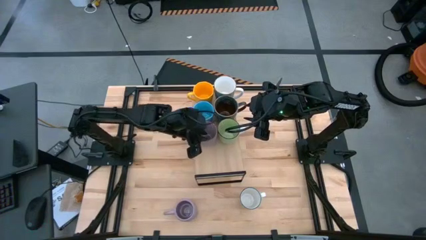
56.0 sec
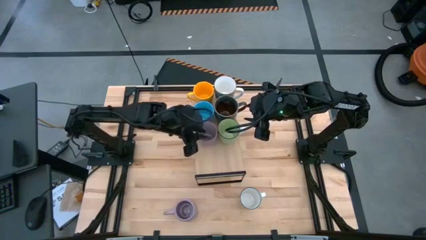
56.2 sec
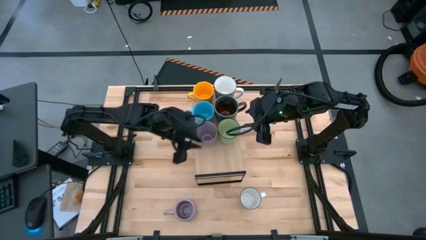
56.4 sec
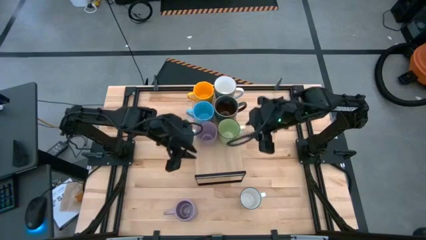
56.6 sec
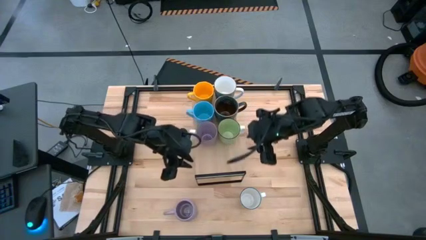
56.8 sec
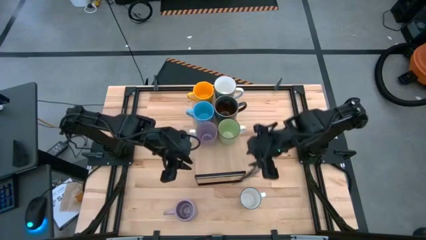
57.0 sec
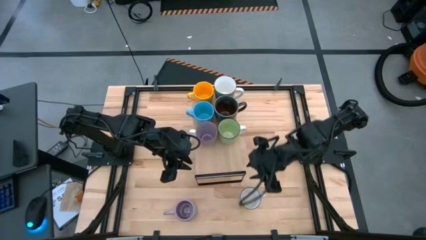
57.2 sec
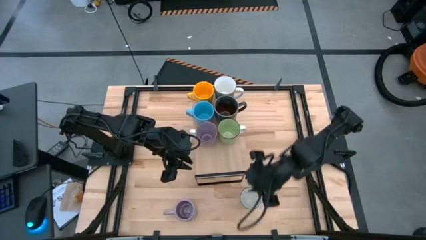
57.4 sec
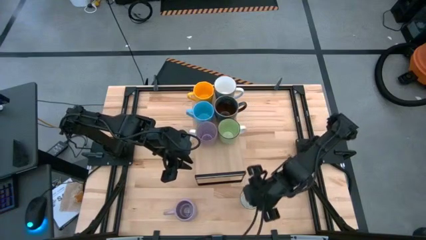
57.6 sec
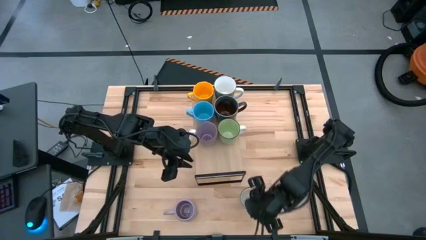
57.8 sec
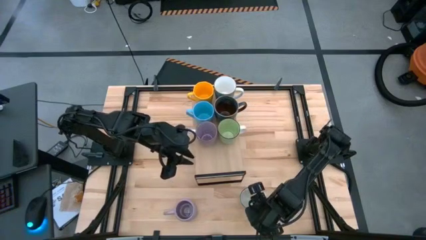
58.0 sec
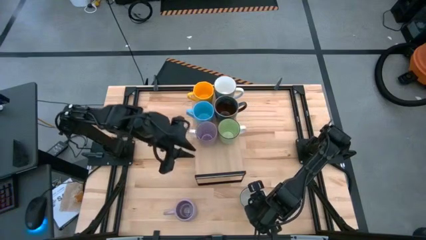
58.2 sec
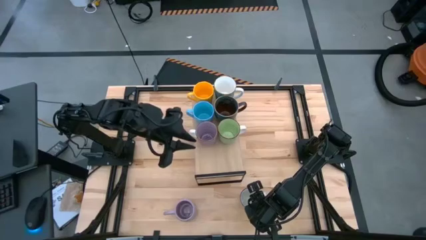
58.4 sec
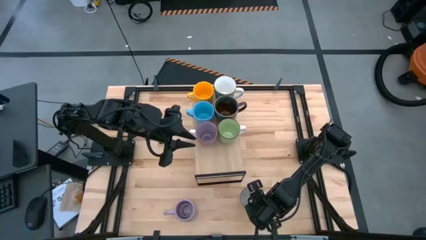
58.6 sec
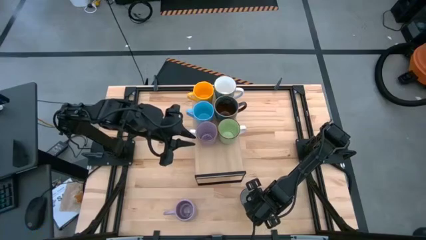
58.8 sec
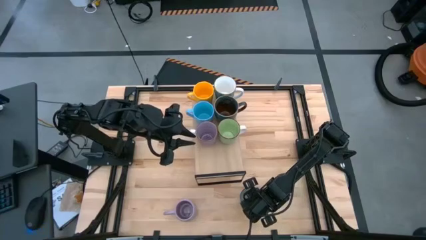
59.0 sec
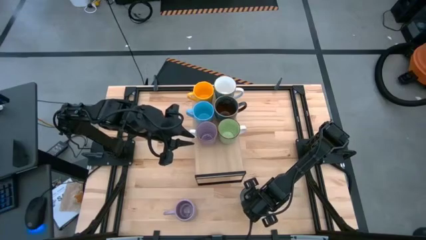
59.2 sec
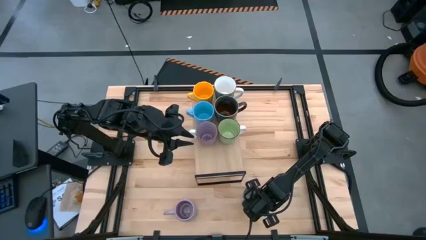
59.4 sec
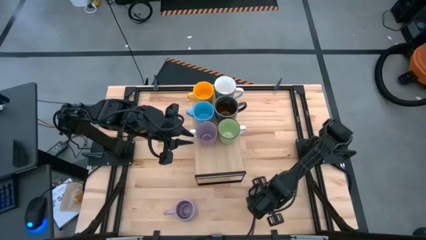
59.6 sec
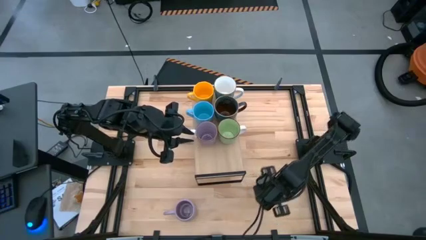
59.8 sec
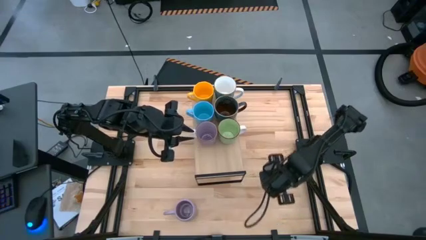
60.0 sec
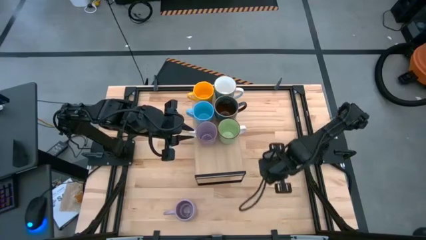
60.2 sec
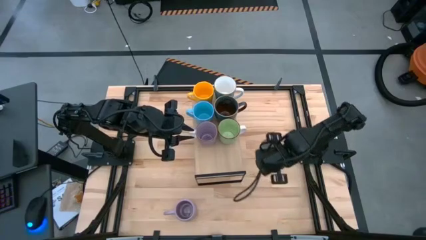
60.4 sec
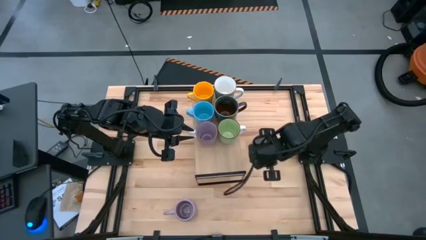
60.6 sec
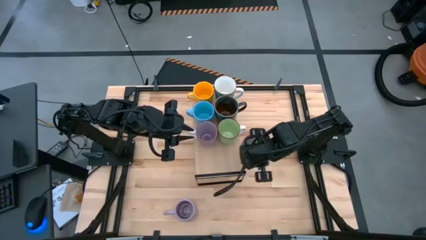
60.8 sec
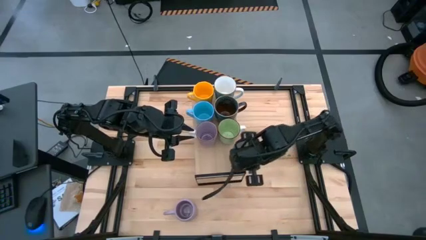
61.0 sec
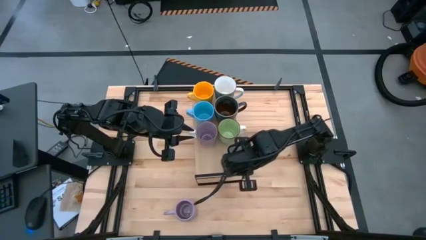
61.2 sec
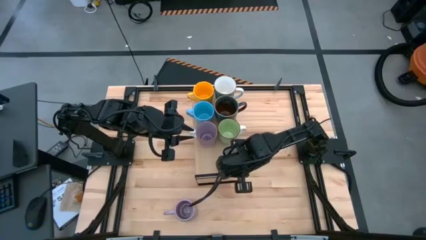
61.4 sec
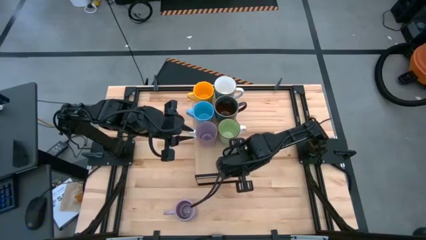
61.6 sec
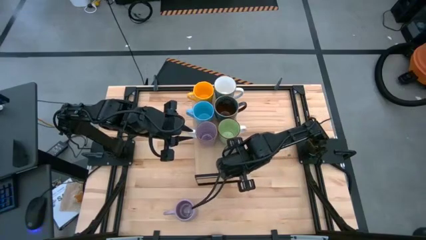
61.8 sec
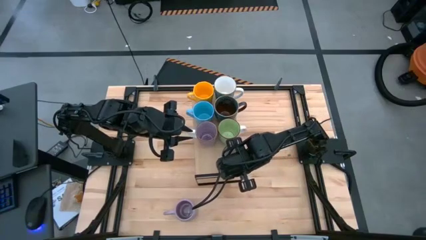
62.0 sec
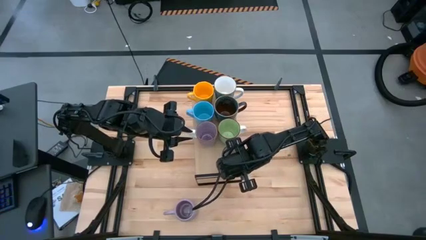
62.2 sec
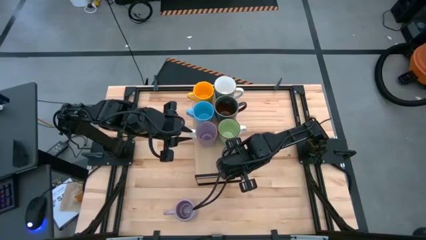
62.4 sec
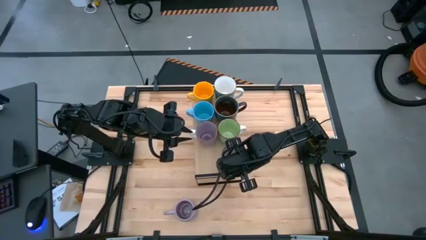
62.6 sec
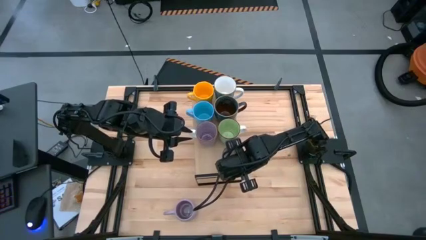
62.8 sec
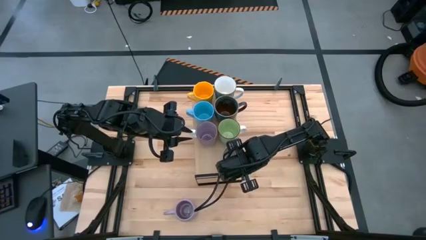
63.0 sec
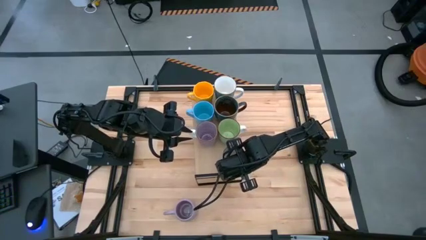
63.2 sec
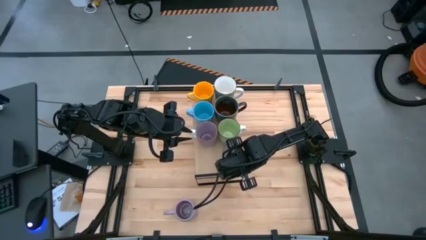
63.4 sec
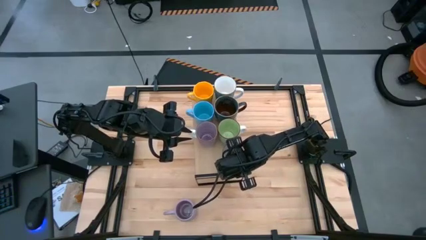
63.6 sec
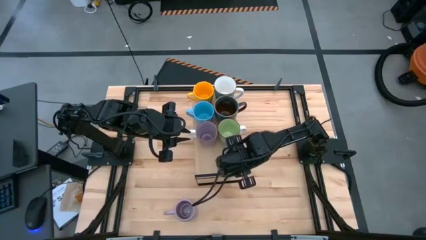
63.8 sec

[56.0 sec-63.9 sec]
Task: Place coffee mugs
Put the blue patterned mug on the shelf

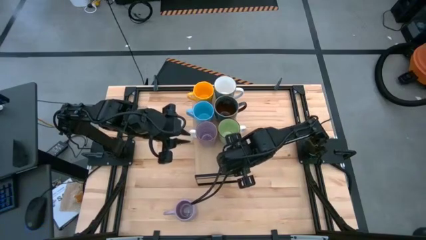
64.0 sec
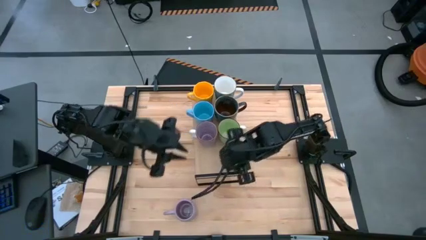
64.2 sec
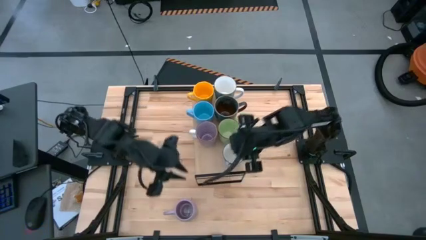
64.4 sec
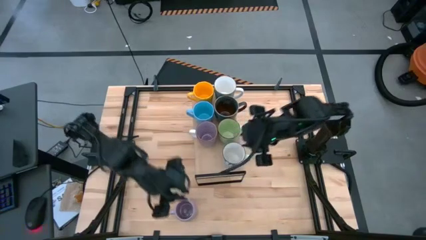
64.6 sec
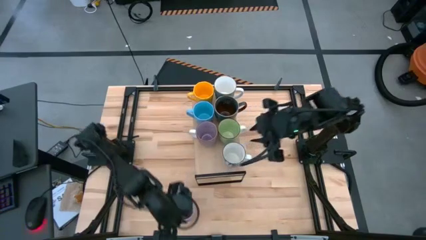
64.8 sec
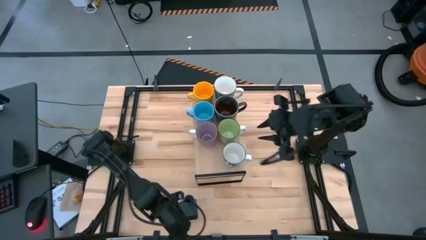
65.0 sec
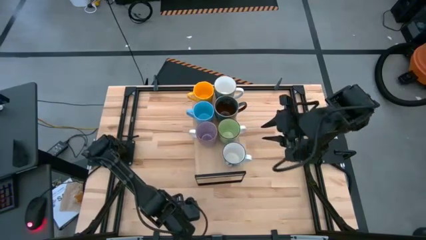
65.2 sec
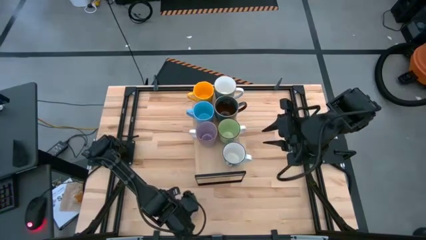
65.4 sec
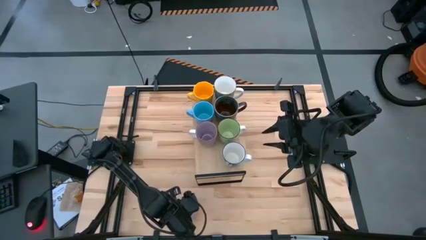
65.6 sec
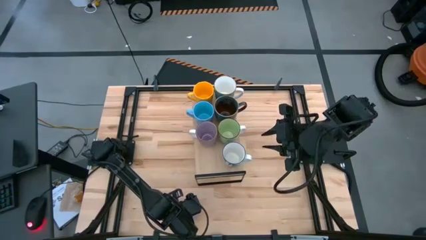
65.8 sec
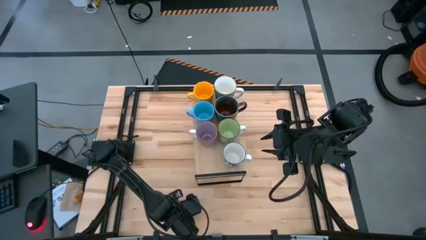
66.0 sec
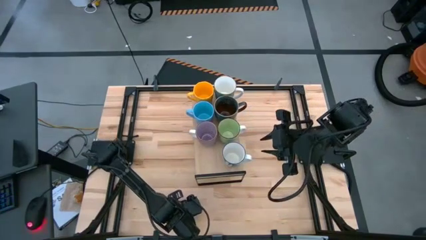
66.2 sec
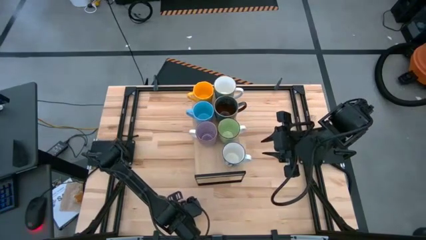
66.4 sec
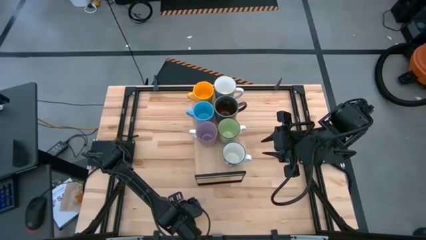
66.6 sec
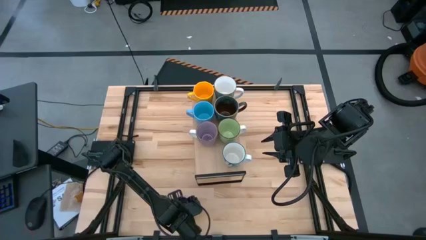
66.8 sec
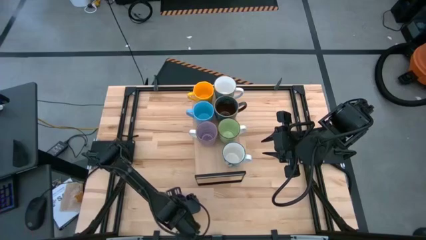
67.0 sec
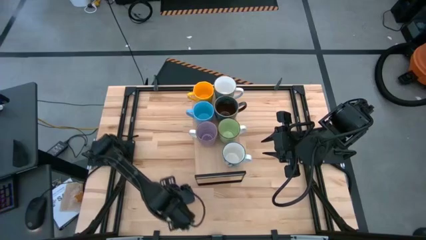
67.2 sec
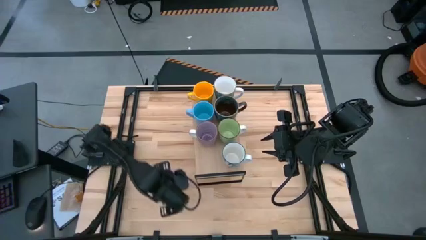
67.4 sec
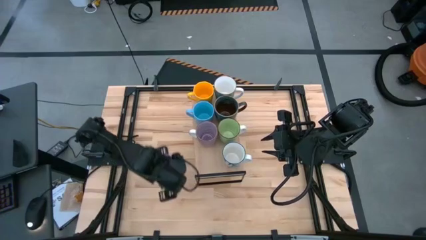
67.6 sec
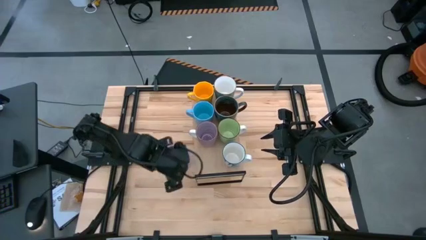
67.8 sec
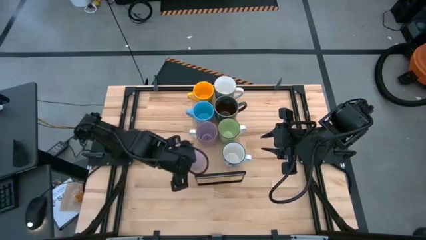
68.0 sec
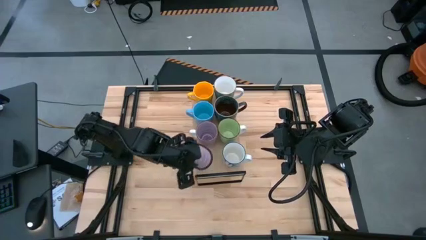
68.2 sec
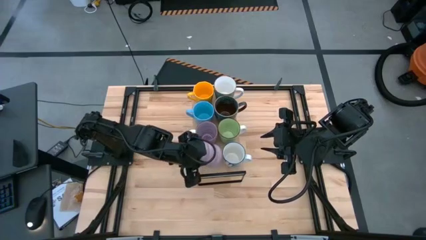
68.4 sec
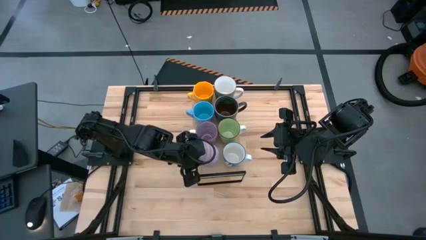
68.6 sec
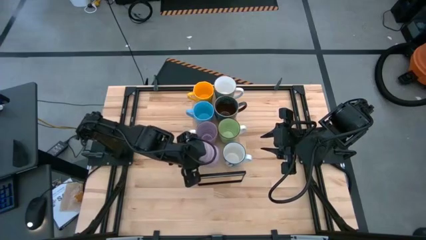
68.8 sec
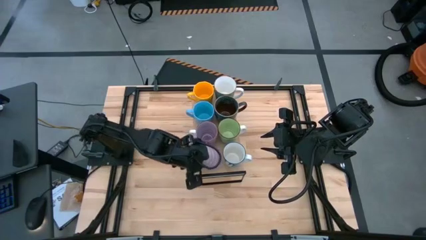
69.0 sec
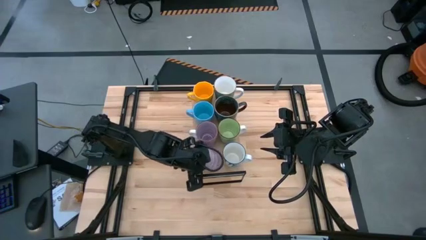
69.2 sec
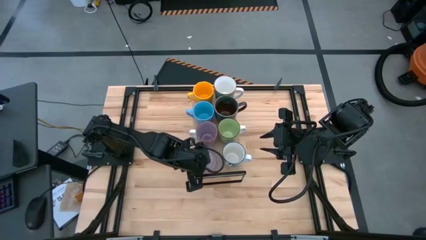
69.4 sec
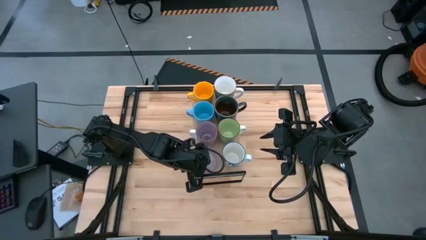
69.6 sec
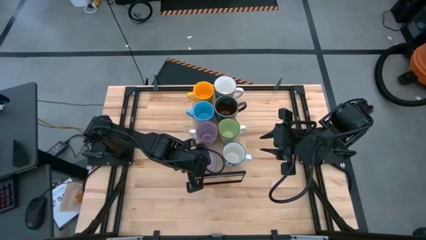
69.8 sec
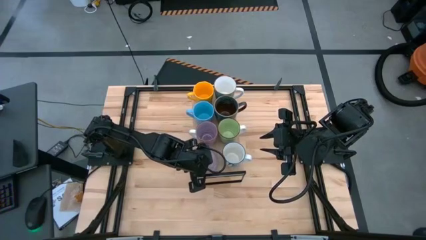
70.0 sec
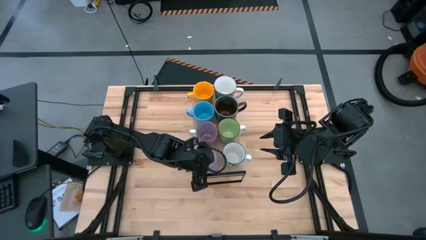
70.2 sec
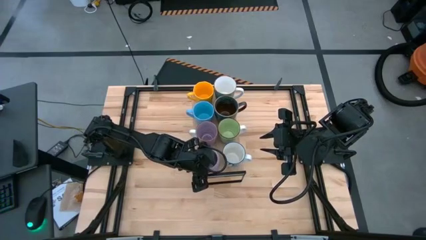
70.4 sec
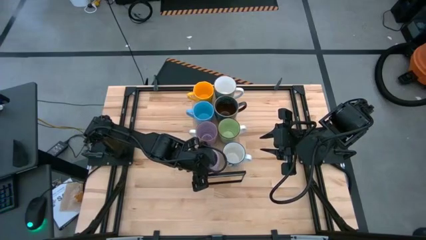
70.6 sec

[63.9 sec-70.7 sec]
Put the purple mug on the shelf

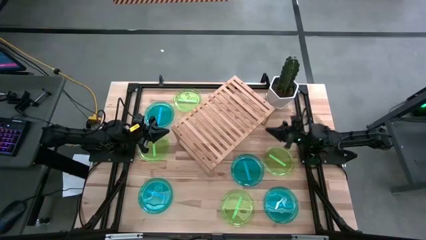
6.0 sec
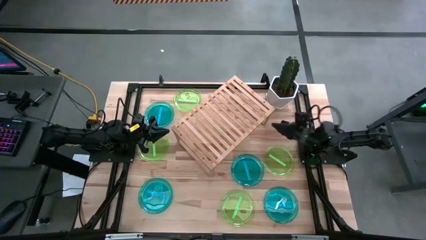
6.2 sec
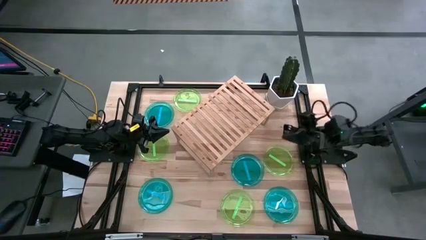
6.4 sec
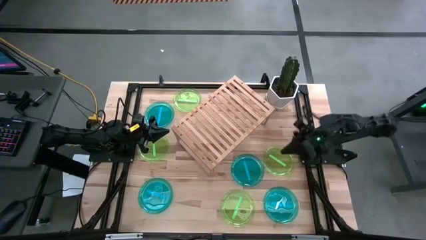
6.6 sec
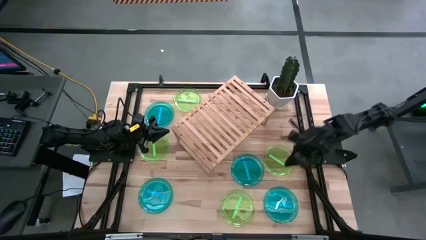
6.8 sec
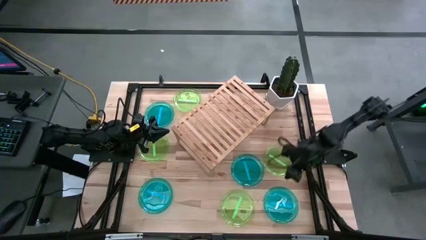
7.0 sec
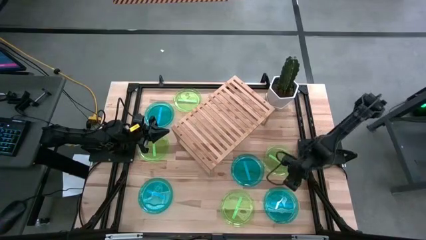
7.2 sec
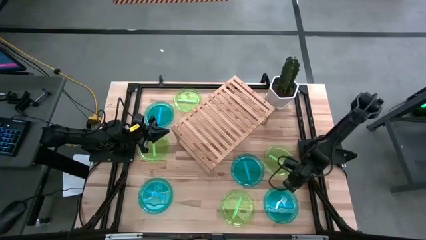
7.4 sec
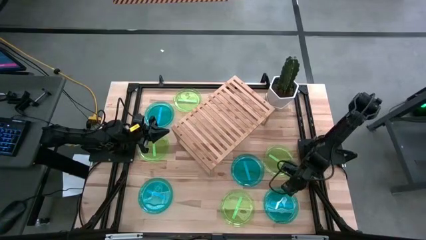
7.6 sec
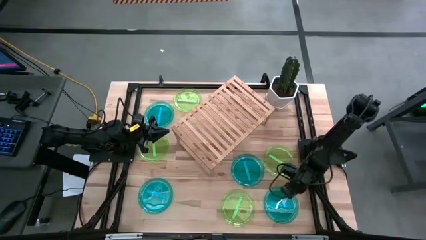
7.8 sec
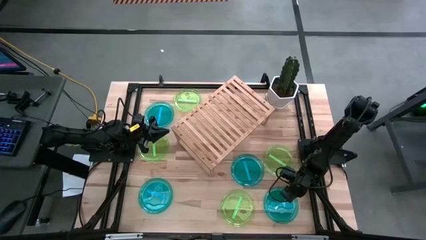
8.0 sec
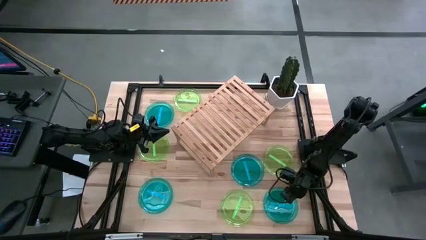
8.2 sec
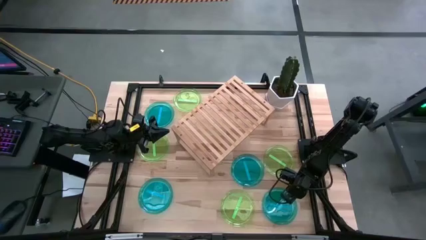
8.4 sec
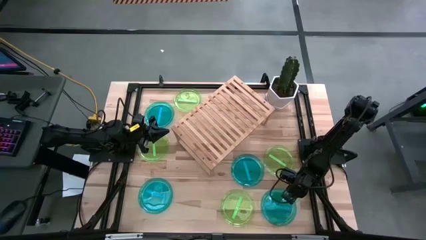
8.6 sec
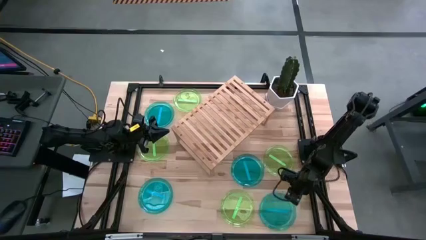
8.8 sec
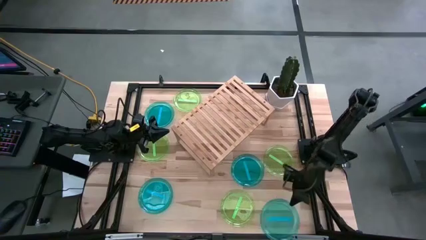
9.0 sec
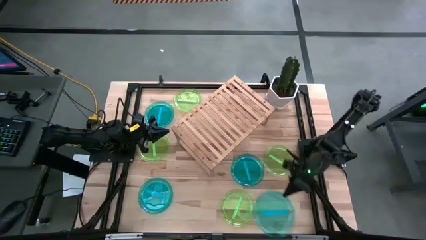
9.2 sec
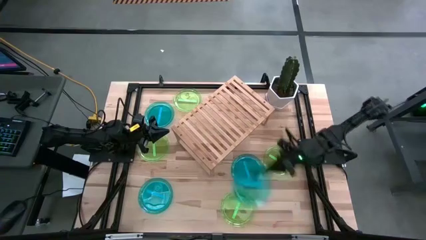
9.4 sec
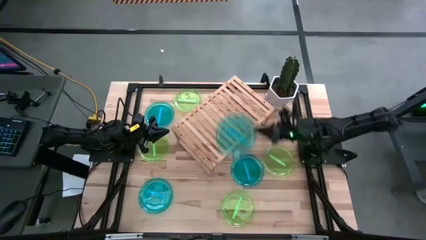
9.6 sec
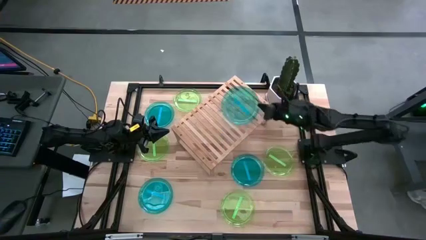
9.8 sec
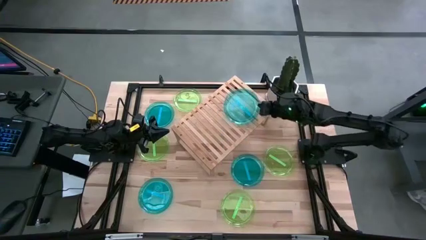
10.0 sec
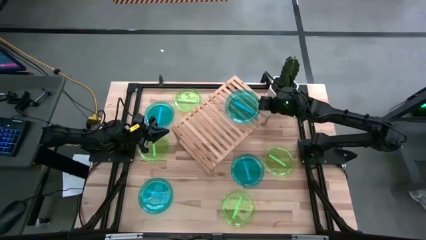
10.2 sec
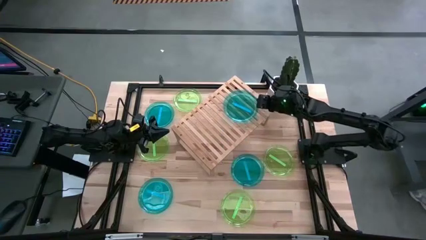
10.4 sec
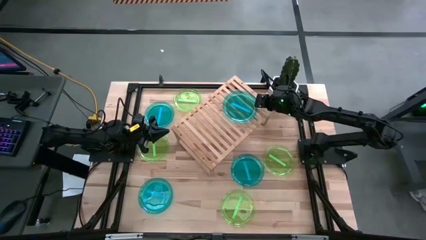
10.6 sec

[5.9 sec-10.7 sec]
Task: Place and stack plates onto a shelf
Put the blue plate on the shelf
